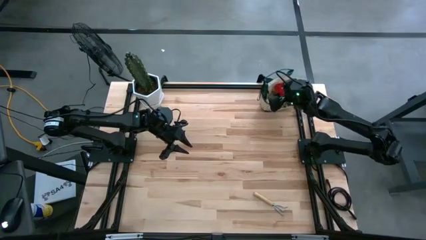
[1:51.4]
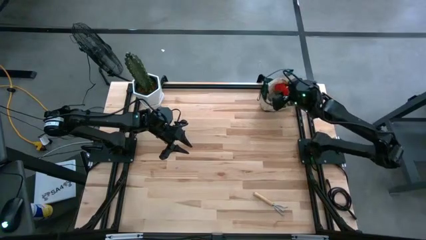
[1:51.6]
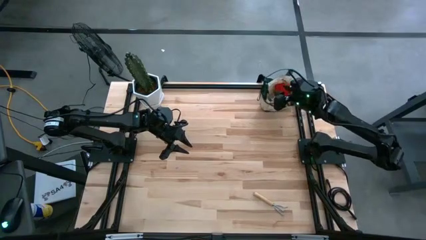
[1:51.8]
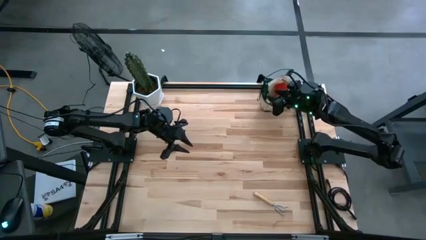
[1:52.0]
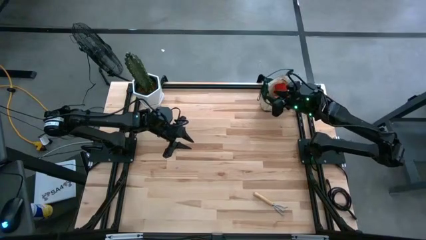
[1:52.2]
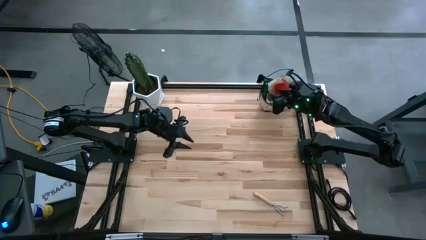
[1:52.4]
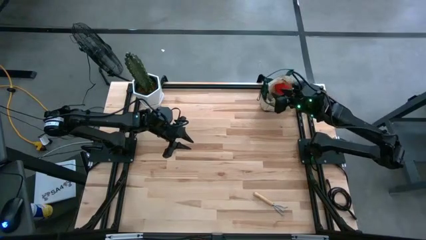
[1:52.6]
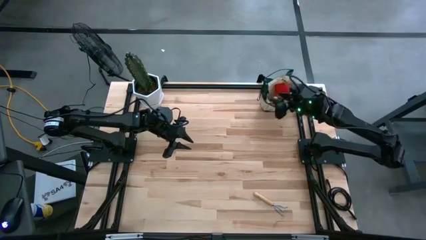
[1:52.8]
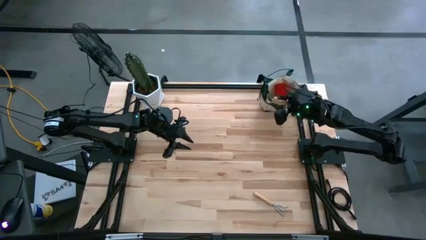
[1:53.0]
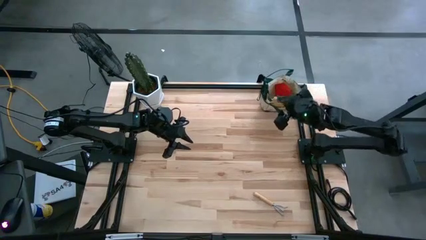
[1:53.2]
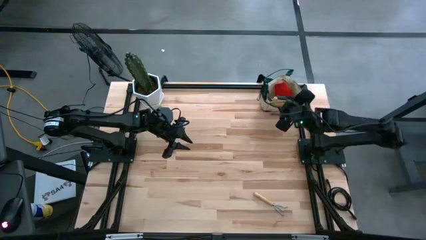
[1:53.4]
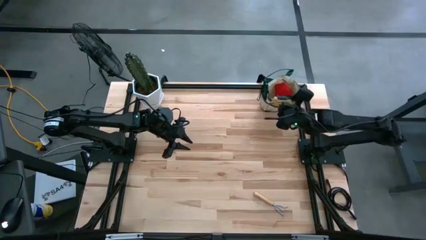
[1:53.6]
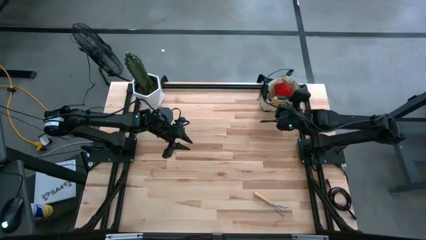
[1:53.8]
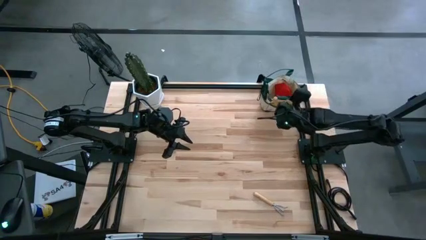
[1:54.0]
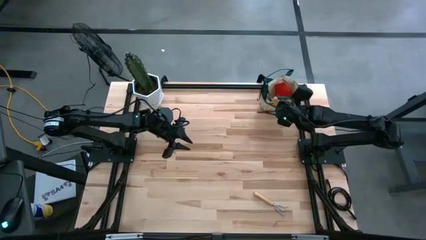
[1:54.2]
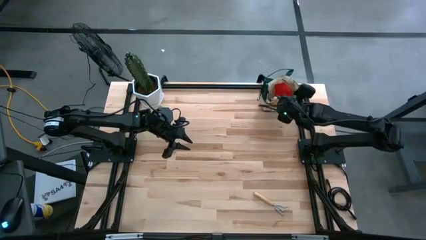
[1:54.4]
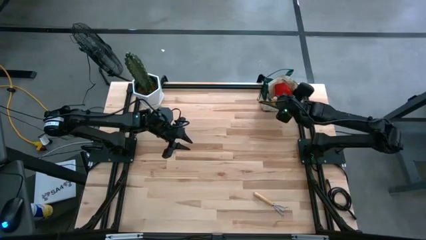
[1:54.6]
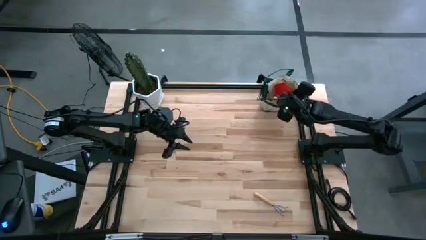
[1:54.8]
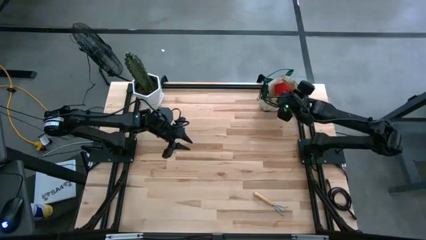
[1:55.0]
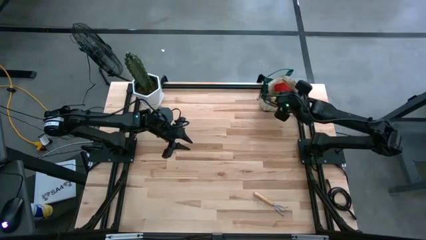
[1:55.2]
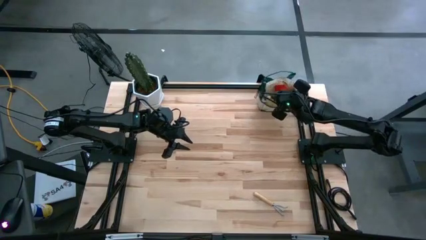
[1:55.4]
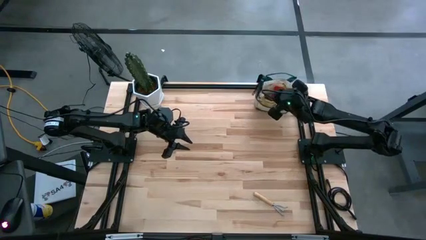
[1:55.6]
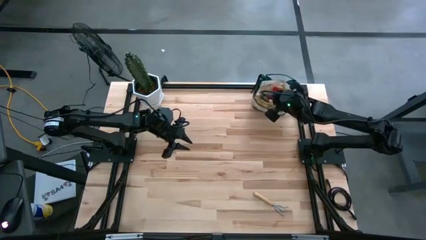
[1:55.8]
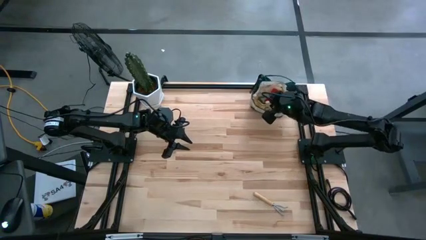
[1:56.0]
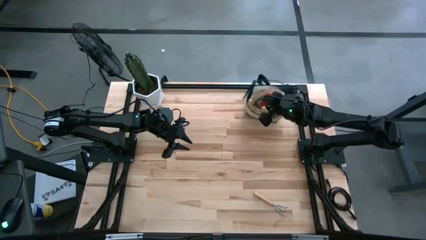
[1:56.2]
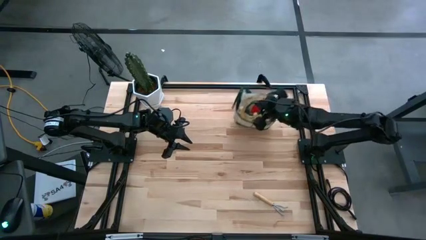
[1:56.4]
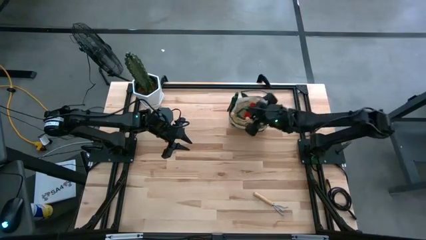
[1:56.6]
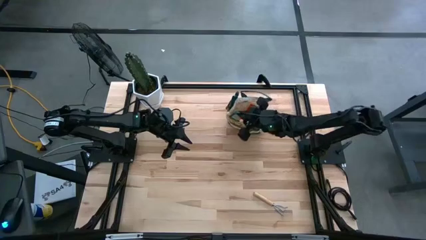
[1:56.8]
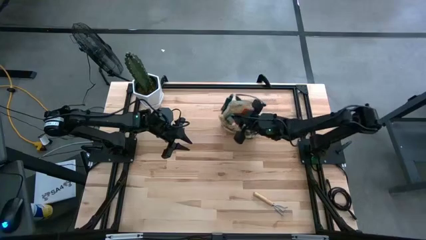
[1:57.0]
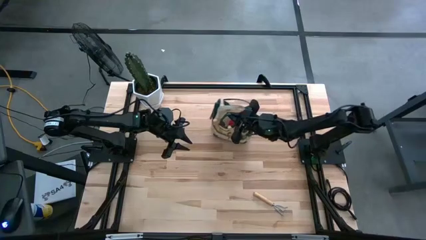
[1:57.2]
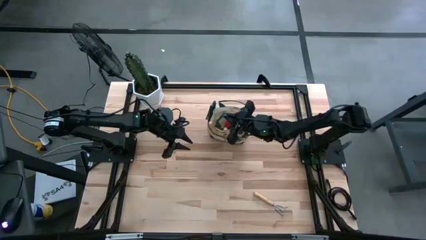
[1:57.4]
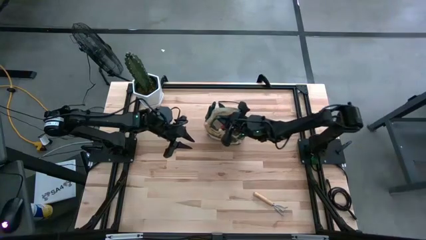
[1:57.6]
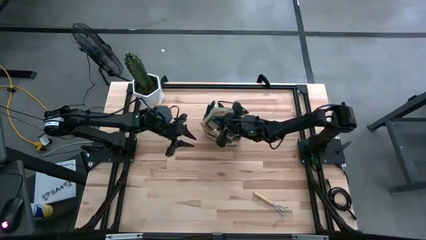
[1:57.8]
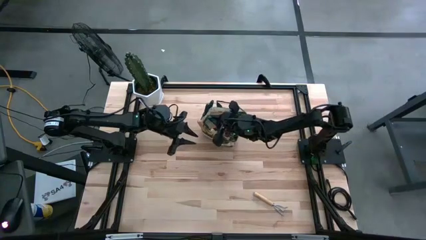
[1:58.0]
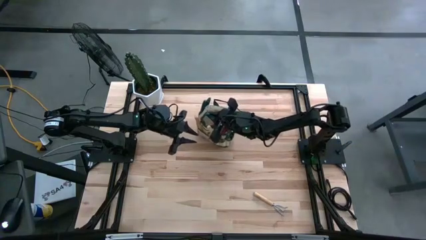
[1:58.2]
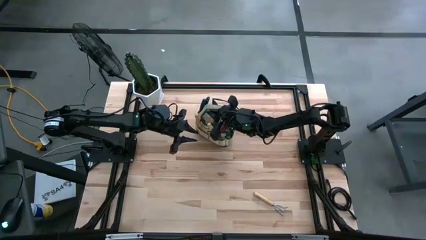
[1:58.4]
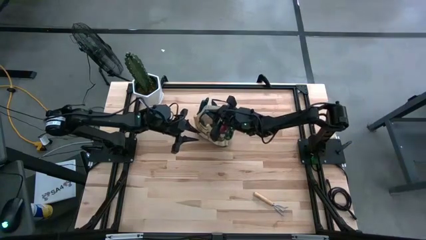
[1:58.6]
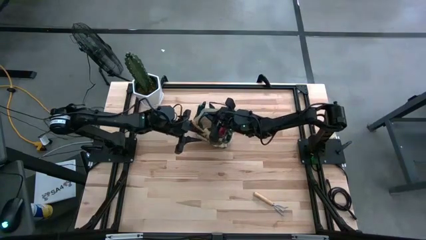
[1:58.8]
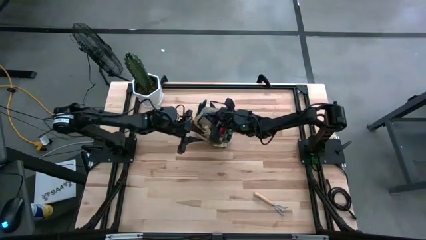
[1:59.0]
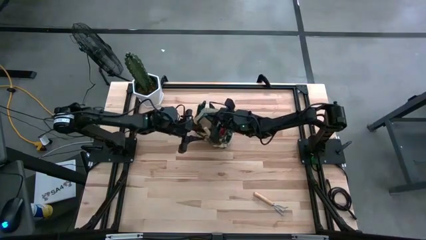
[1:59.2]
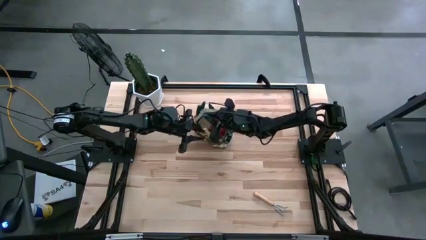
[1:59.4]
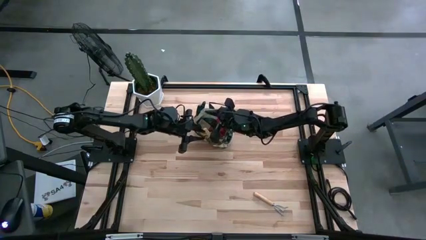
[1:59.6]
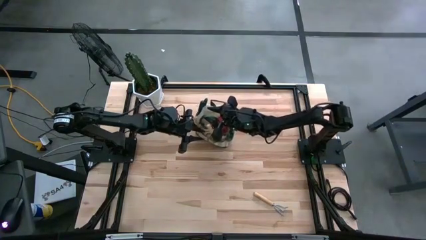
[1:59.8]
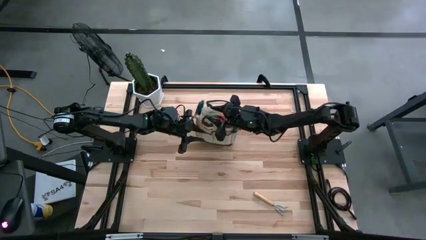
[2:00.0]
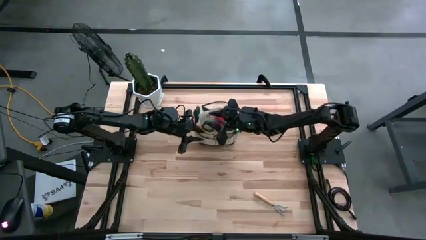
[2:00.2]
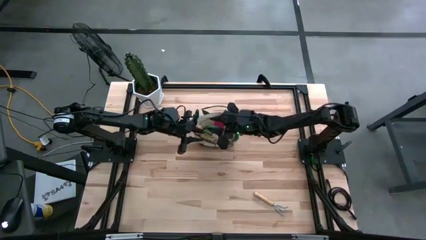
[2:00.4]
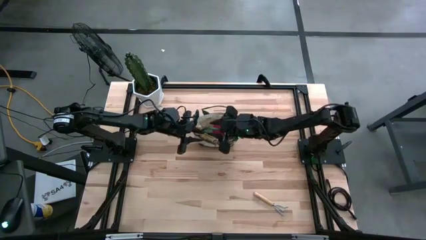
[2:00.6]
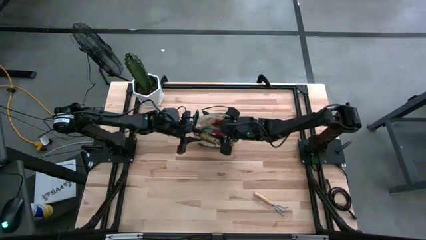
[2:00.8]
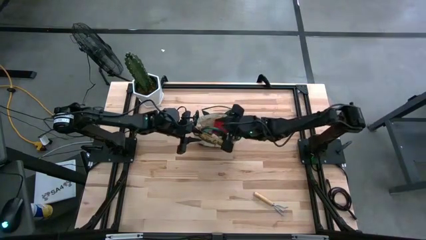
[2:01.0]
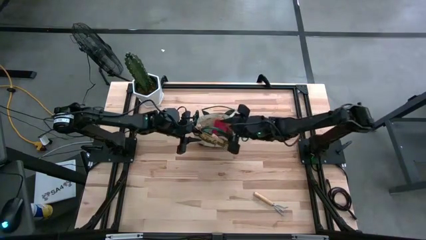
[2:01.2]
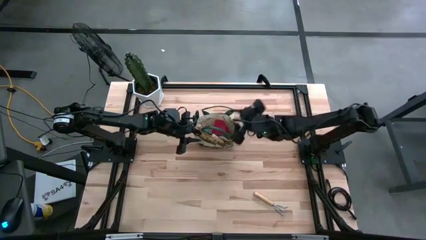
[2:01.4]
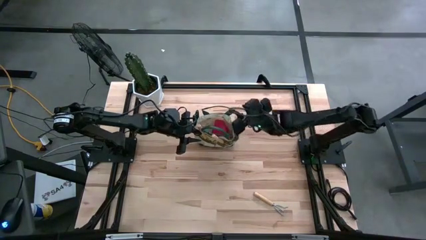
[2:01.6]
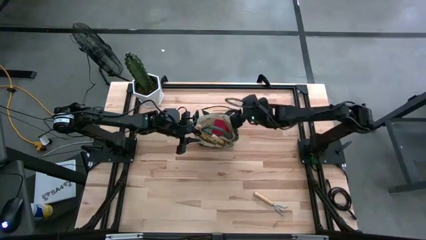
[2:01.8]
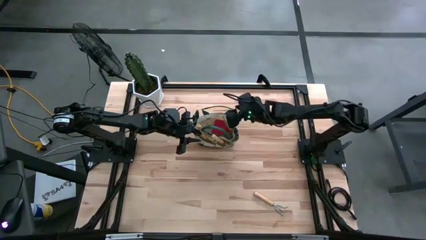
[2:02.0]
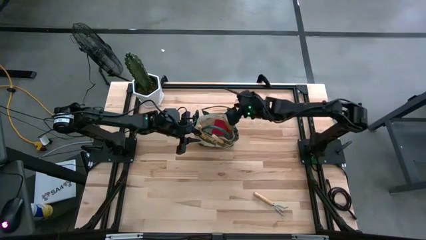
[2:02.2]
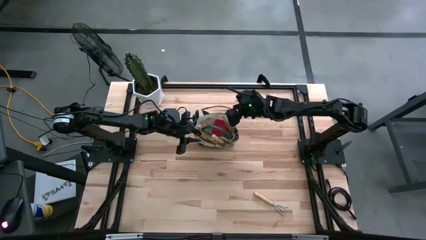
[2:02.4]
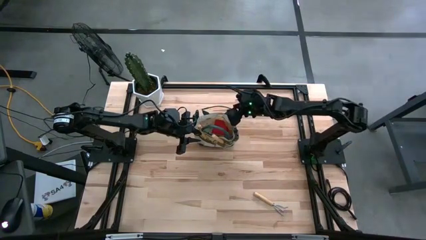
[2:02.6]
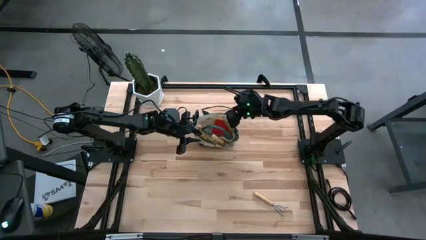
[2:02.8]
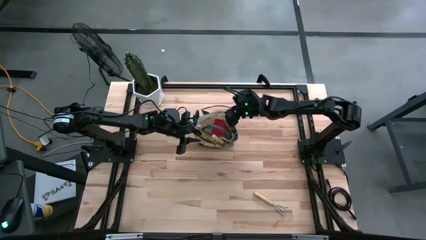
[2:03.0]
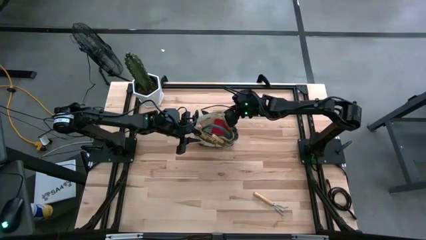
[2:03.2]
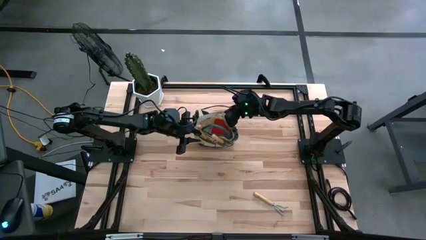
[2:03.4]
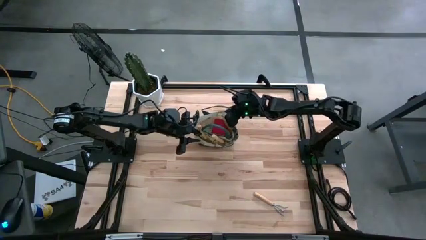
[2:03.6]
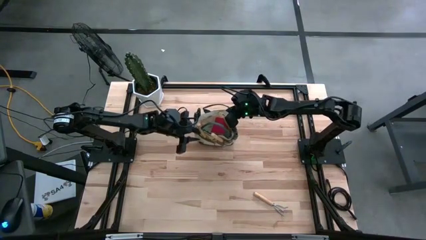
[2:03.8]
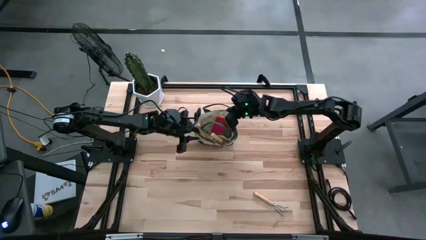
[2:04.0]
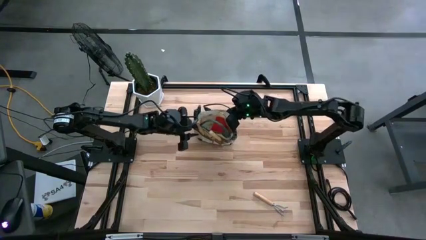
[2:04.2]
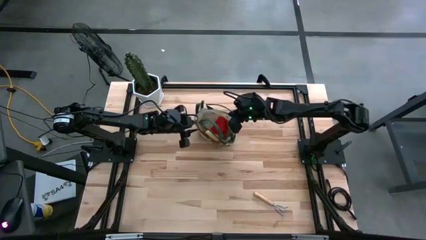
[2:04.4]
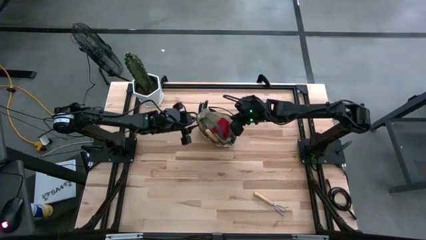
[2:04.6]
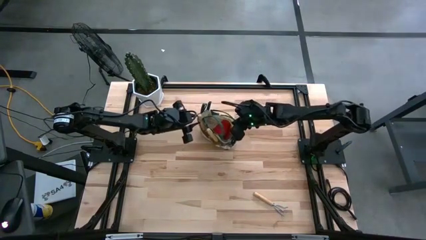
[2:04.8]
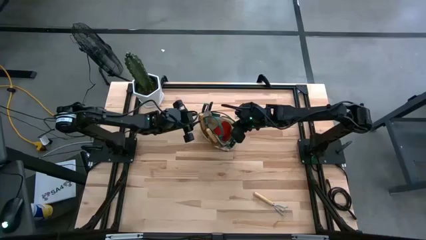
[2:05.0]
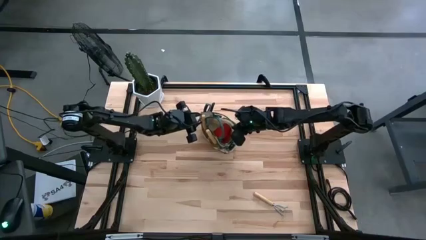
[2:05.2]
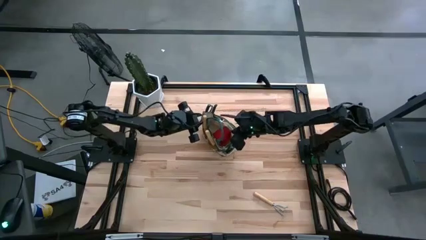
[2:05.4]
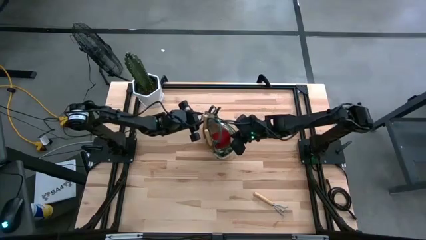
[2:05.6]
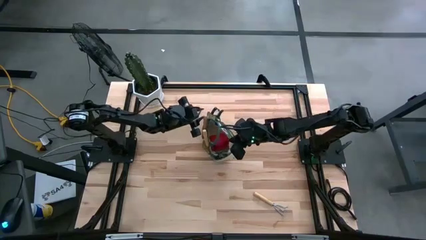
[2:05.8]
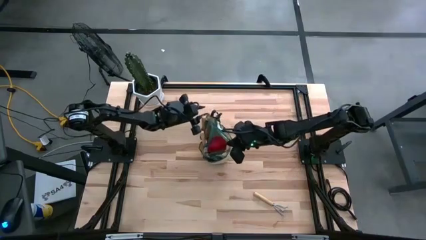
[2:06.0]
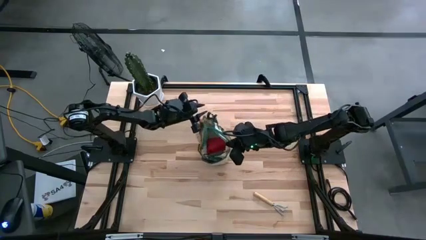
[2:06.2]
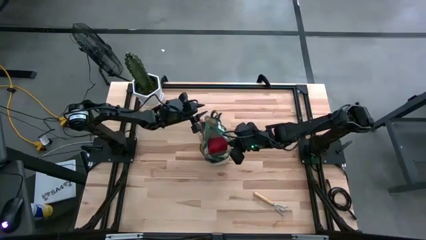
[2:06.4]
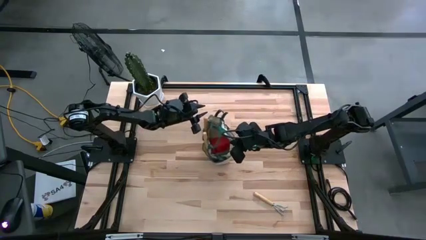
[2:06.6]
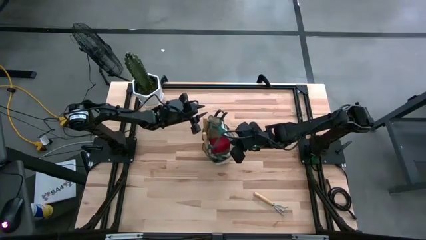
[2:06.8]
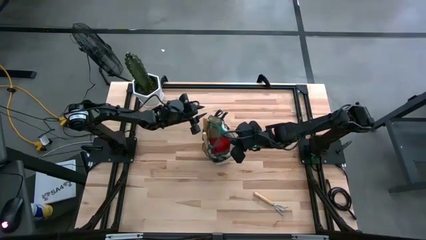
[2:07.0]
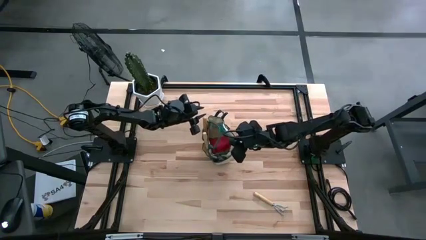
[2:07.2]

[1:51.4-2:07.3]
Task: Pick & Place Garden tools in Gardening bag
Move the gardening bag to the center of the table
